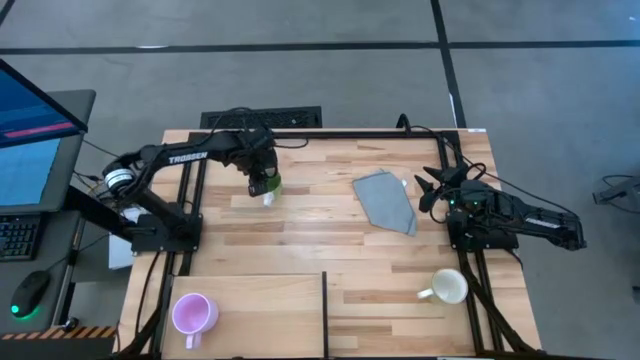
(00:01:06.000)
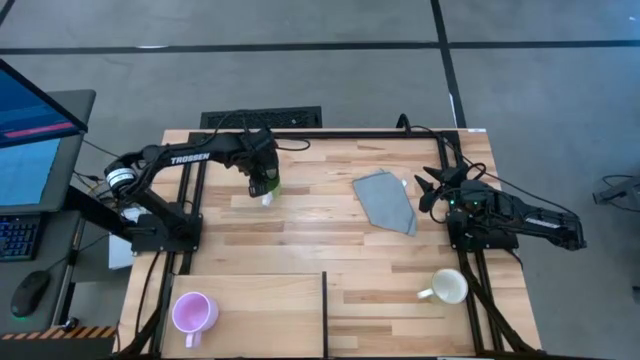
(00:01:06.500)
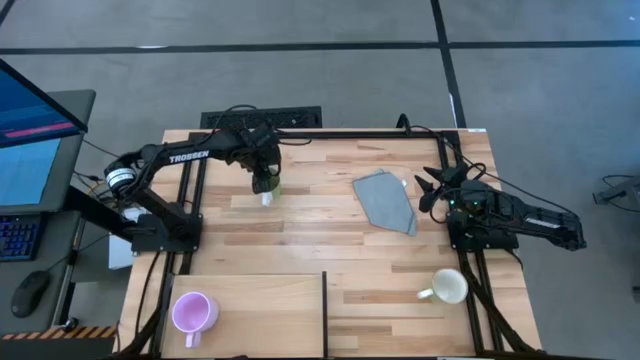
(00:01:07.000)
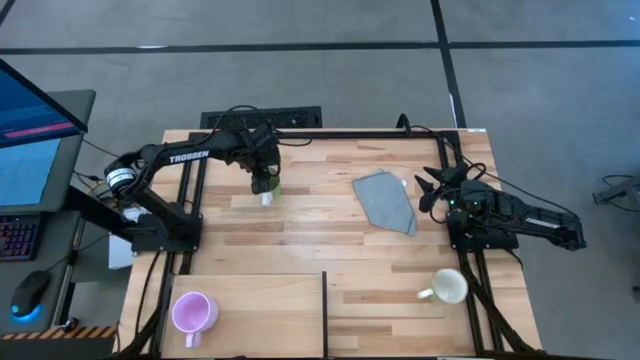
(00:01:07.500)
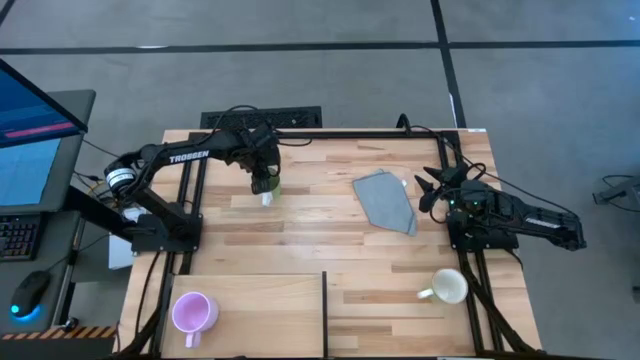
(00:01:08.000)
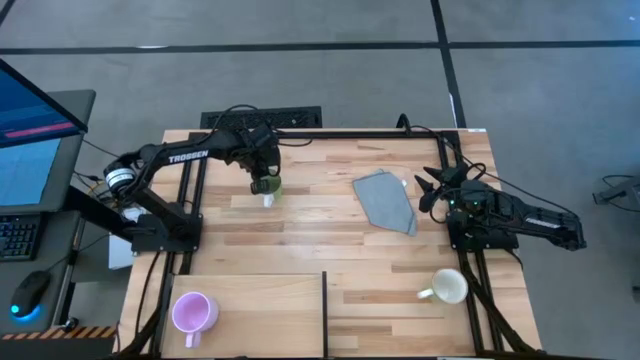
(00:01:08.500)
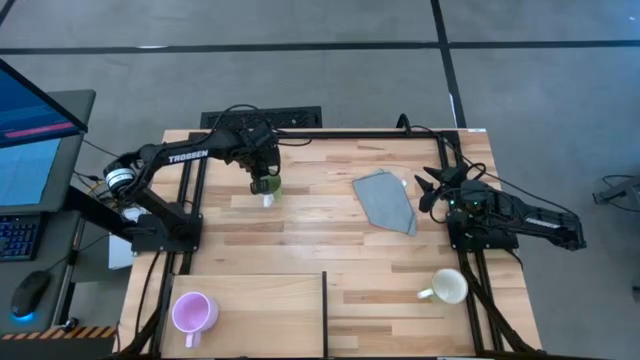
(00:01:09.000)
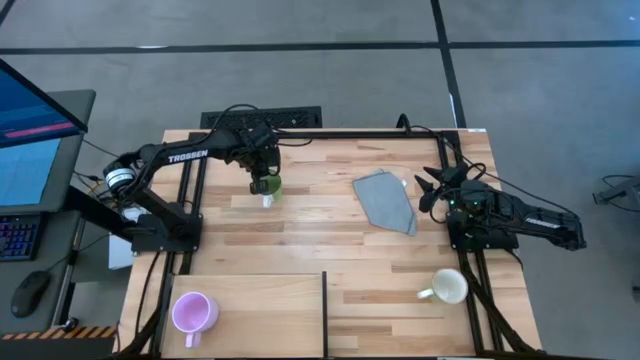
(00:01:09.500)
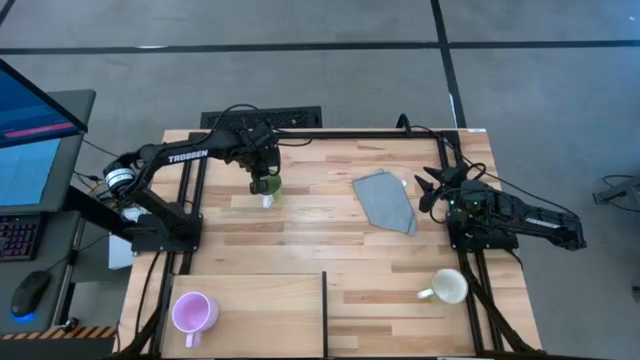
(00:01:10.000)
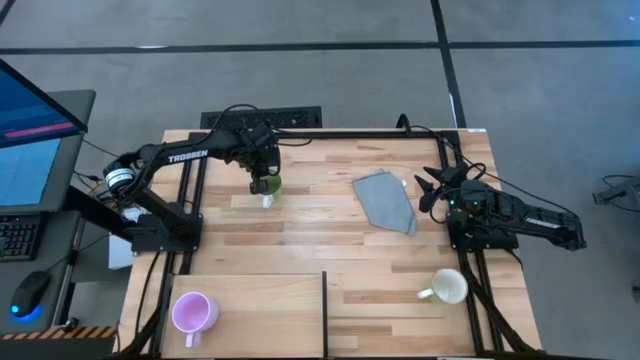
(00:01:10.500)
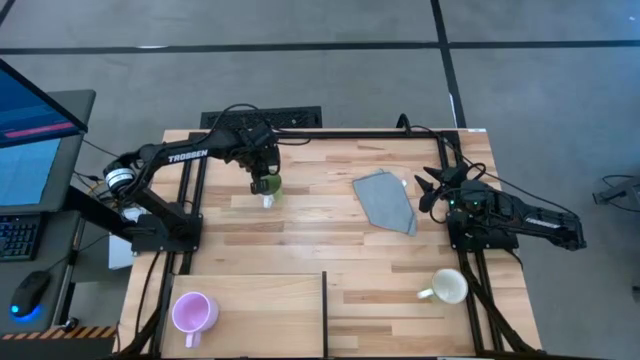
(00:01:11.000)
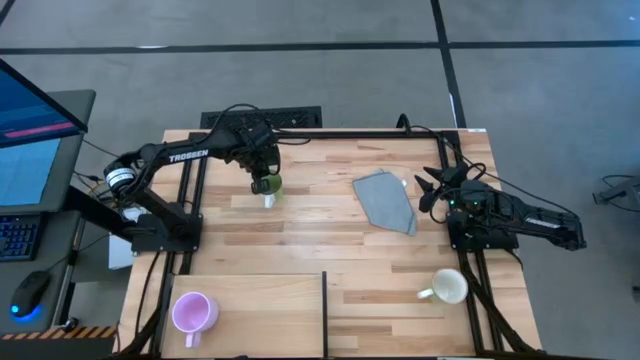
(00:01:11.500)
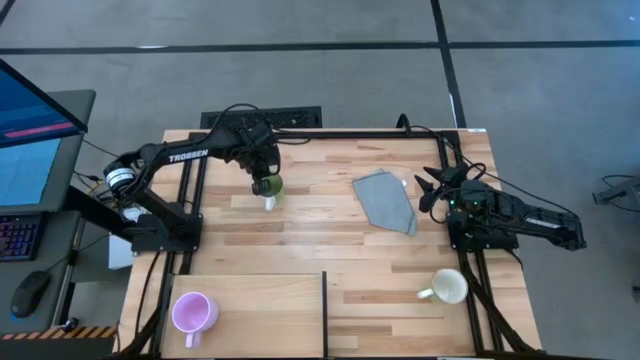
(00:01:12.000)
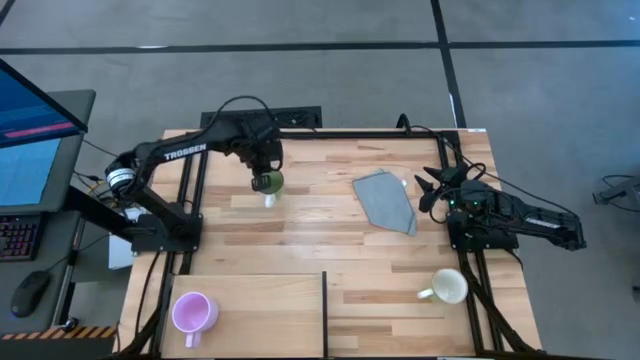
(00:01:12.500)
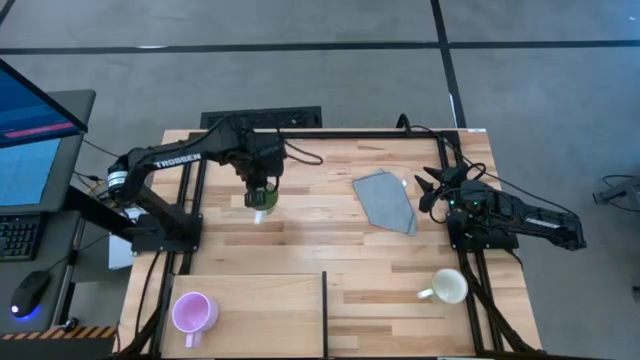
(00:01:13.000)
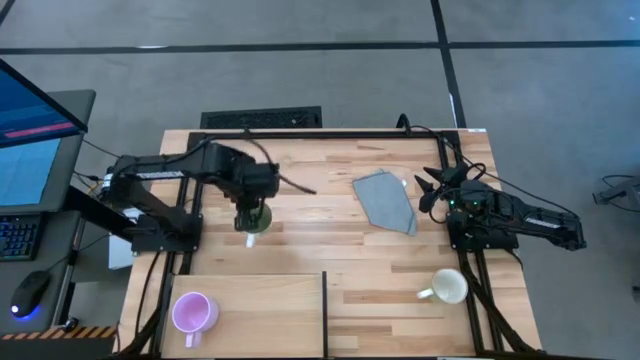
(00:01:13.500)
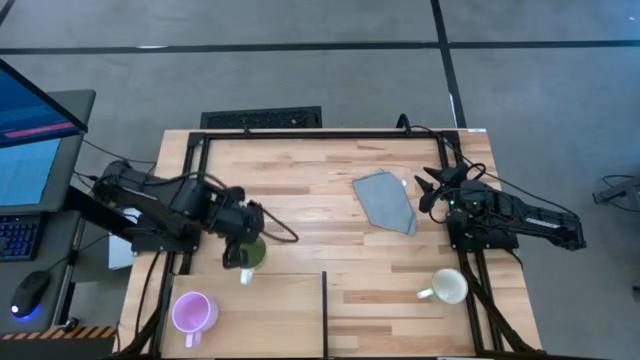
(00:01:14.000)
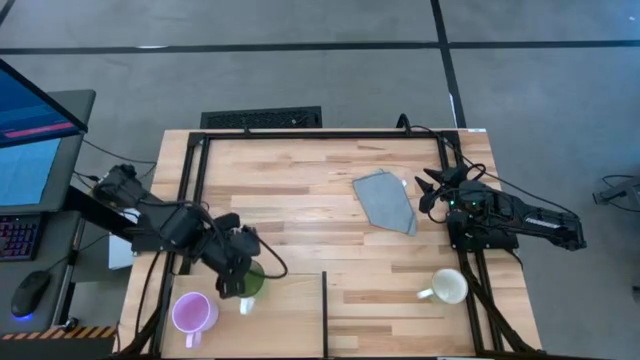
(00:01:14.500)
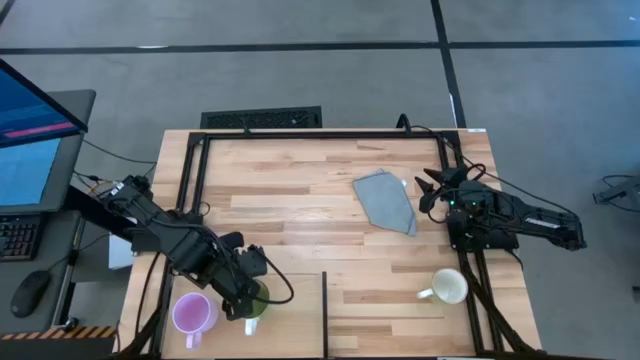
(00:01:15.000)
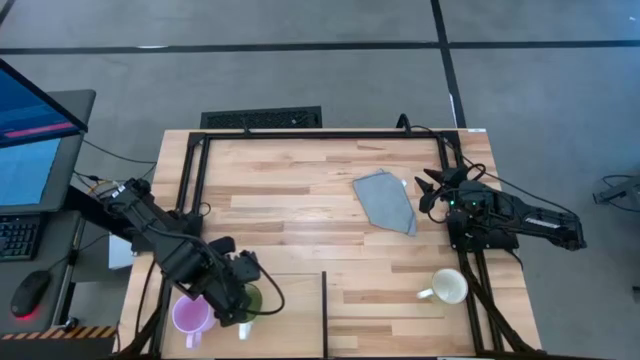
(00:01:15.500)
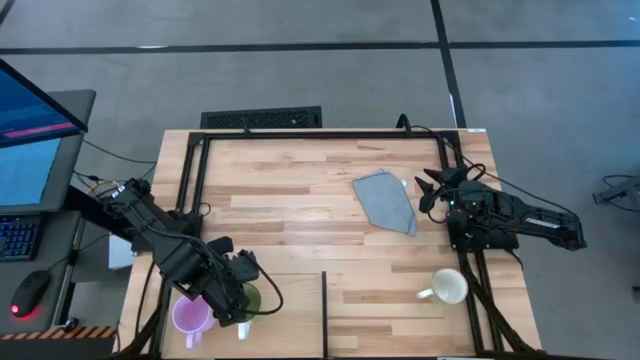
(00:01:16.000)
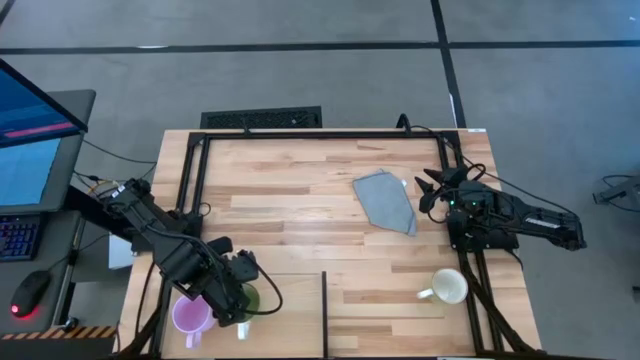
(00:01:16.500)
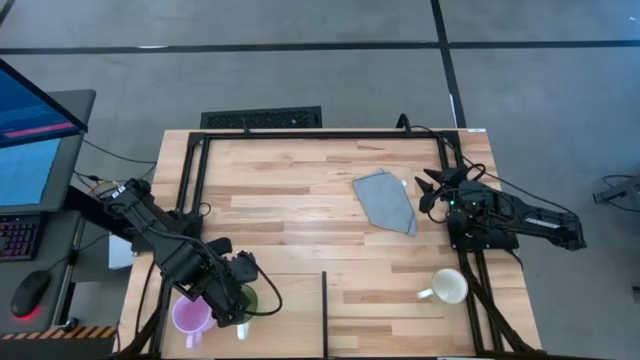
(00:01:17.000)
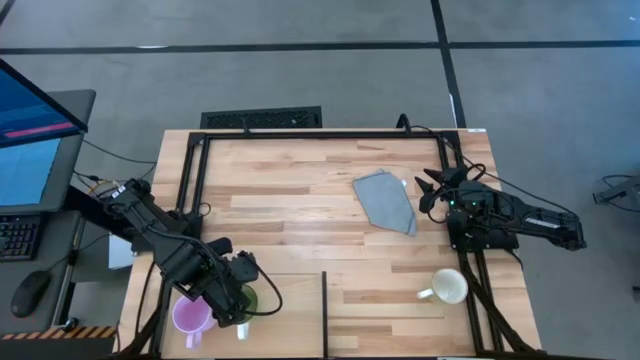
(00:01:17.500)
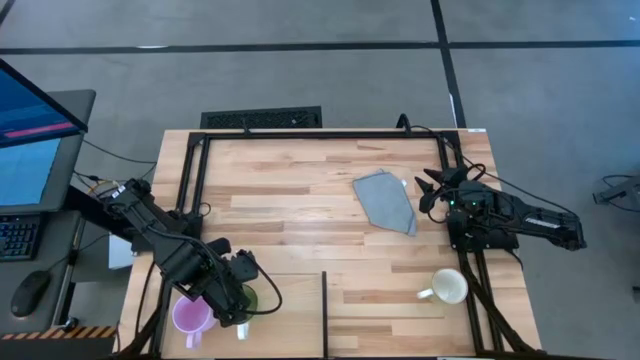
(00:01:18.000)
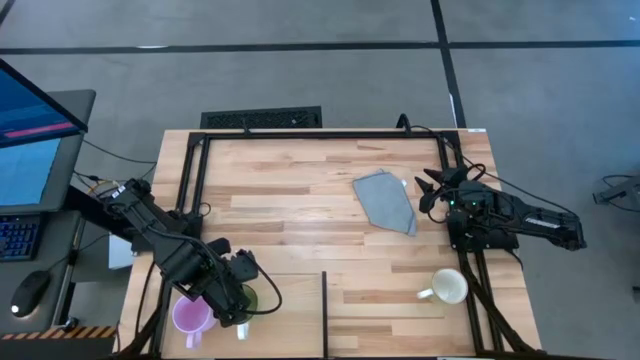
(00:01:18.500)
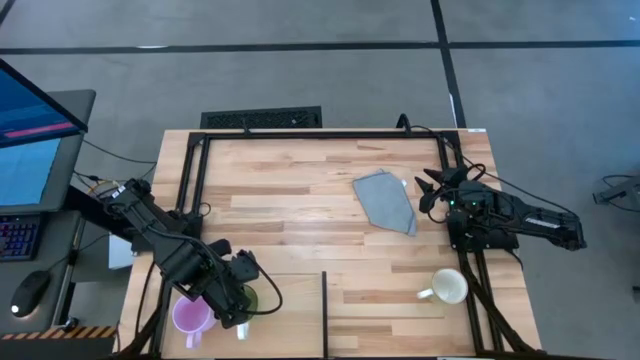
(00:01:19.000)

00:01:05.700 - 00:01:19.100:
Task: Stack small to large cups/mugs on shelf
Put the green mug on the shelf

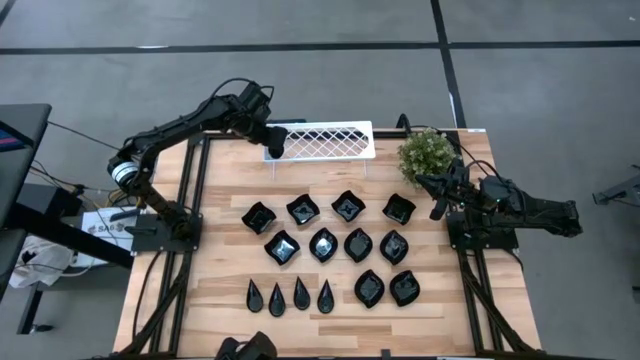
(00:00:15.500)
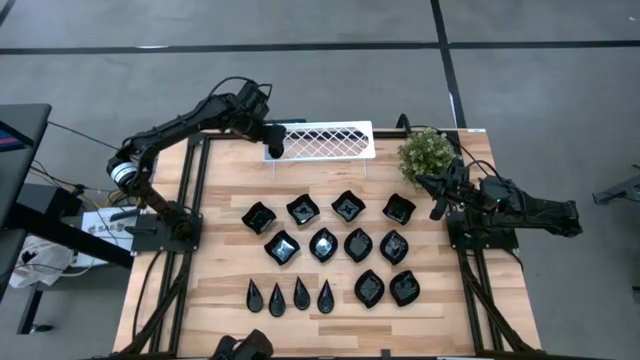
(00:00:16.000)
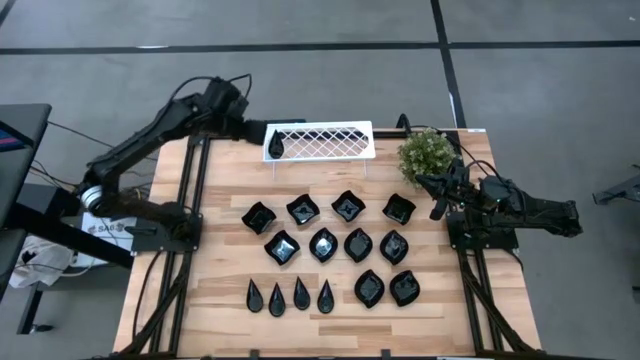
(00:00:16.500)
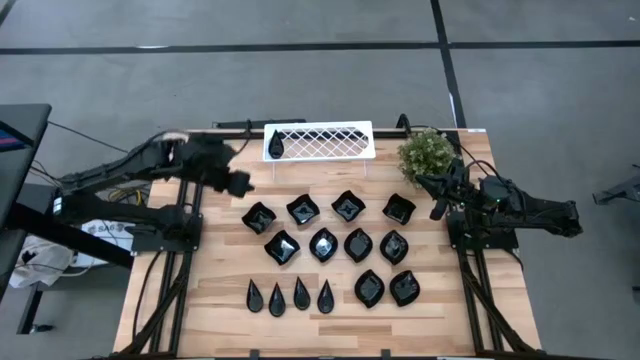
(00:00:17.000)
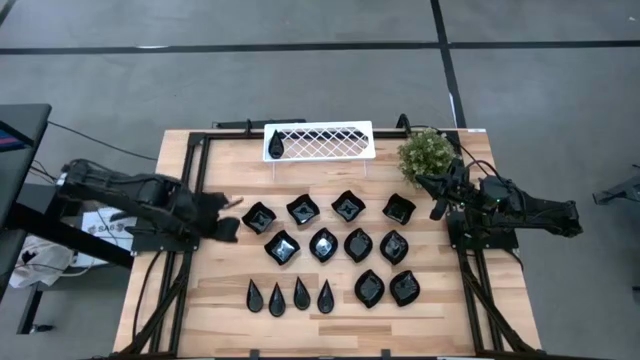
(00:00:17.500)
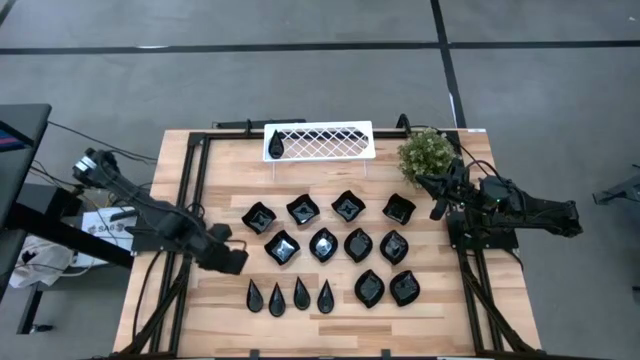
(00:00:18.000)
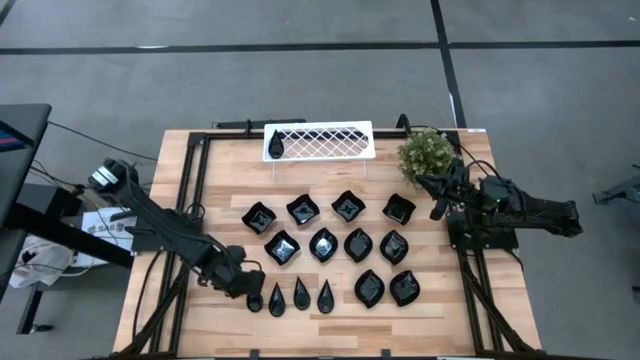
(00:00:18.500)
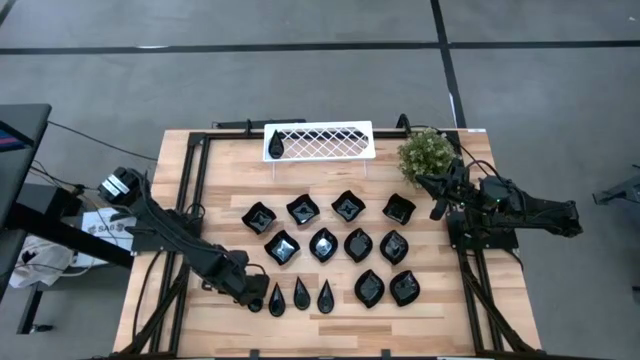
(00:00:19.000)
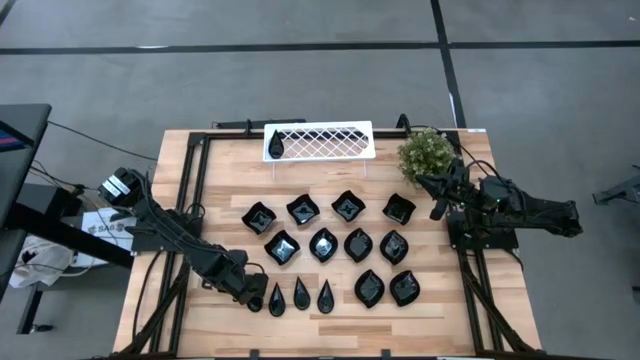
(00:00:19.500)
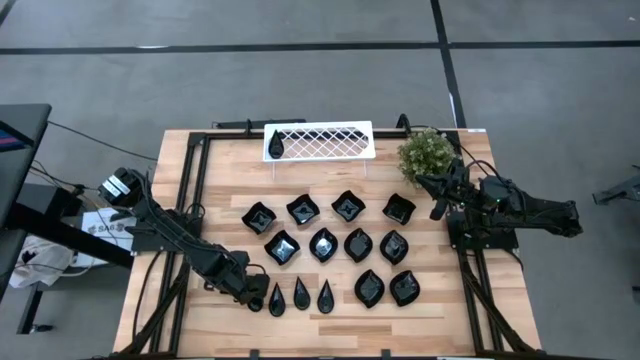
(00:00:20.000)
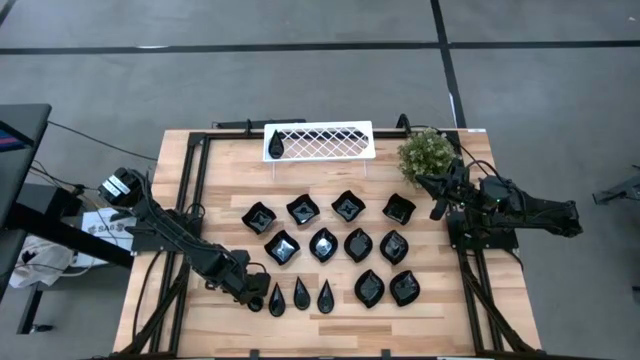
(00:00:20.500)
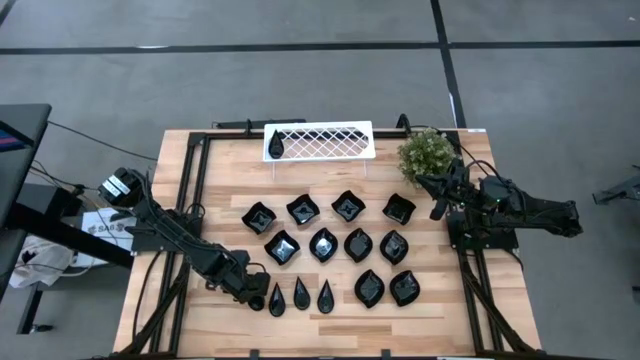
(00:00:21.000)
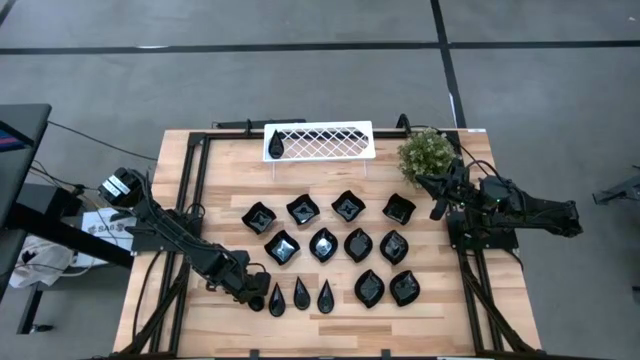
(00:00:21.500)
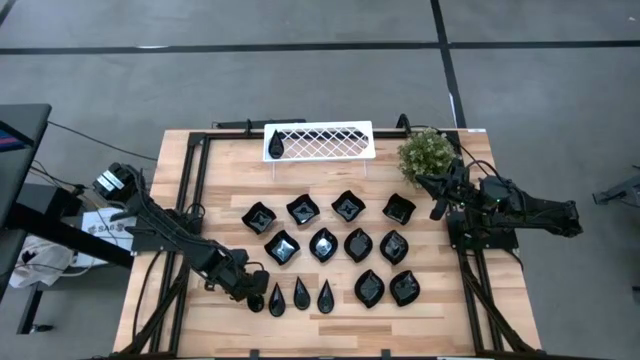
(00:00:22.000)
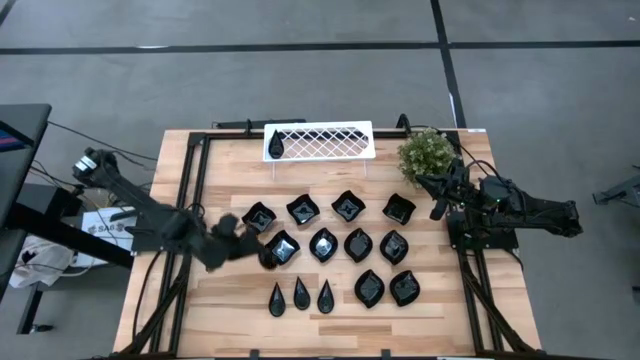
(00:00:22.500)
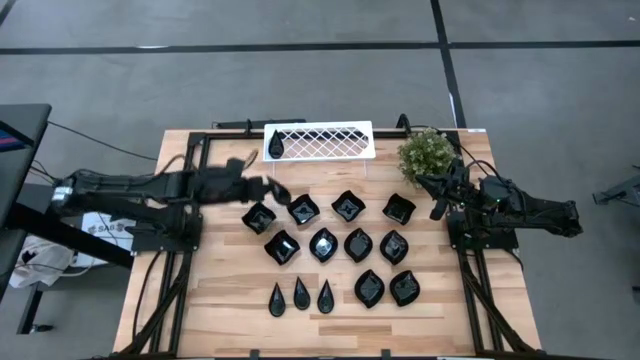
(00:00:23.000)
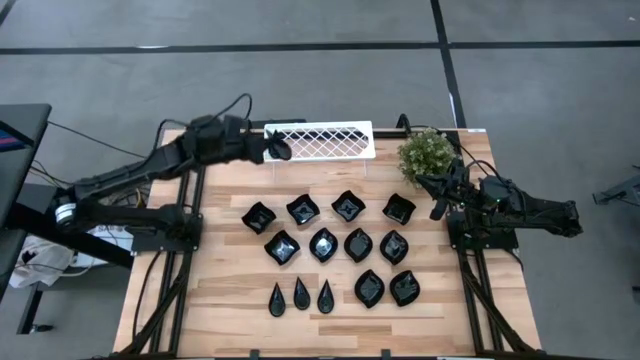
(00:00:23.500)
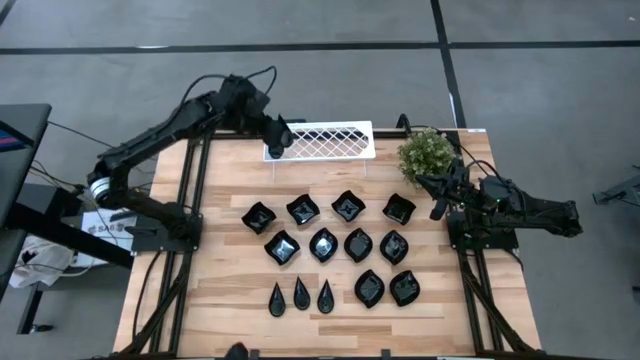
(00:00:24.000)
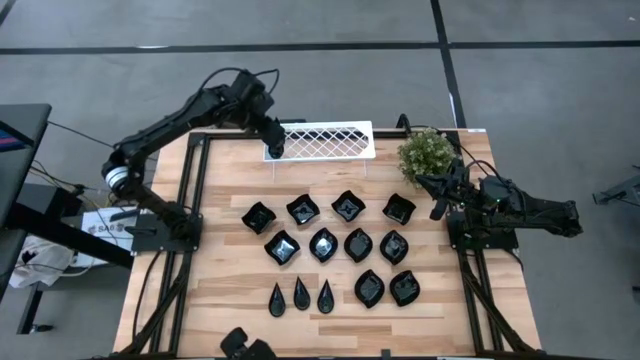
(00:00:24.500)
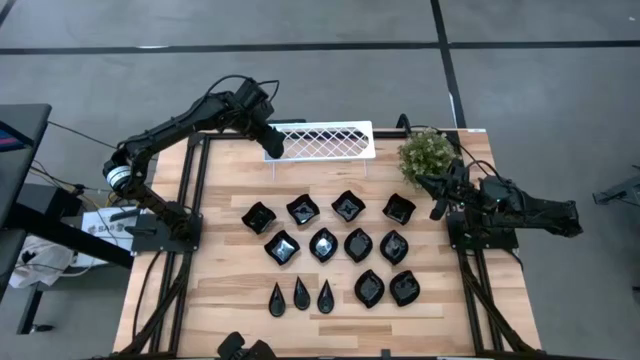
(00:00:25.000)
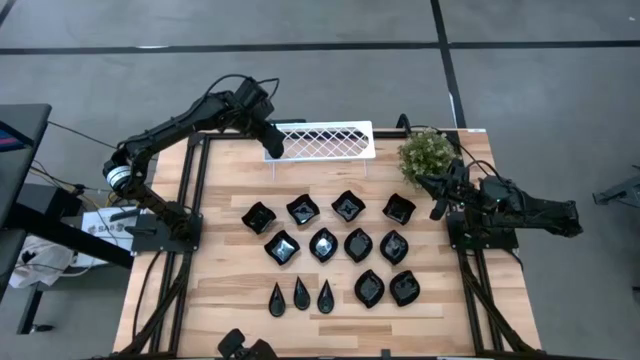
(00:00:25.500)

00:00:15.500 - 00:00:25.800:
Task: Pick & Place Mini shaped plates
Stack the black drop-shaped plate on top of the black drop-shaped plate on the shelf
